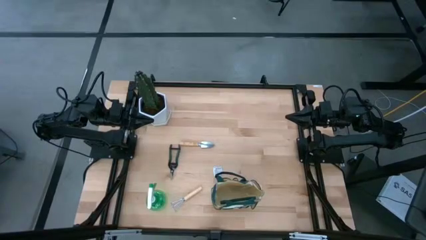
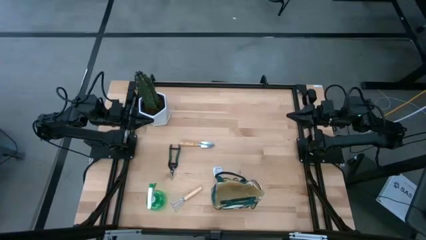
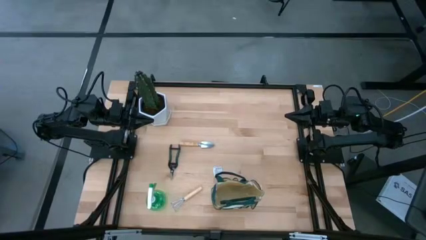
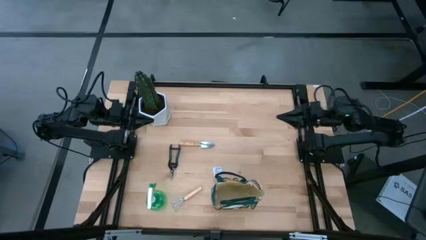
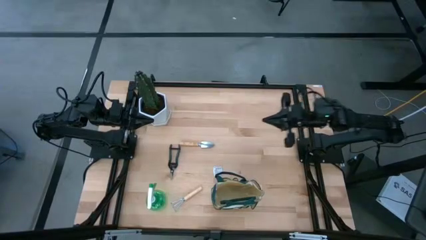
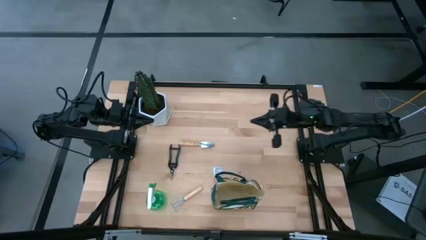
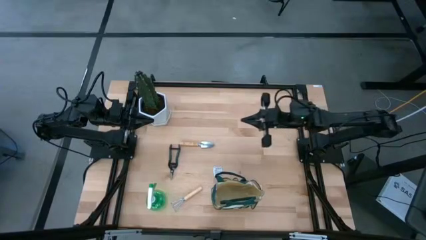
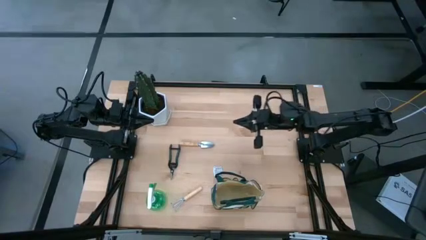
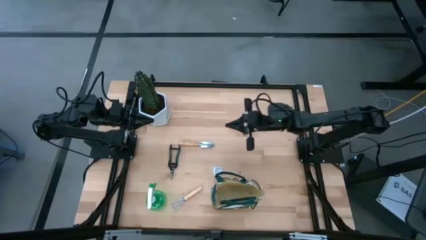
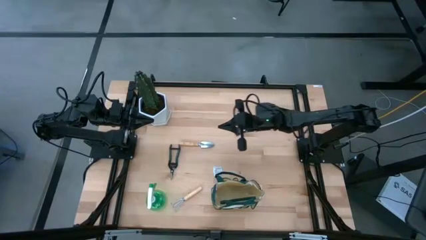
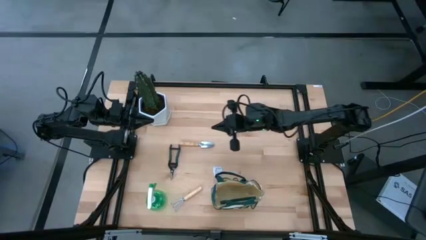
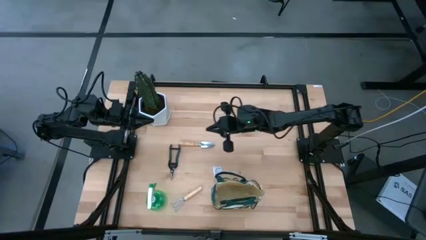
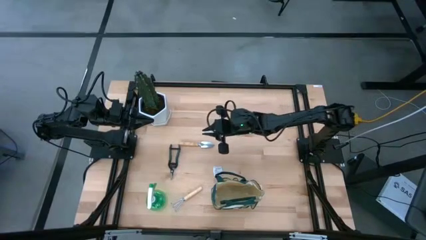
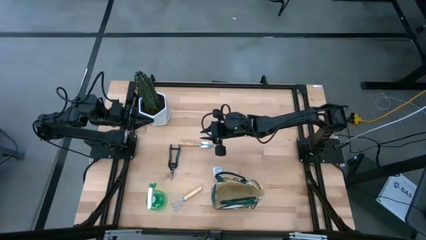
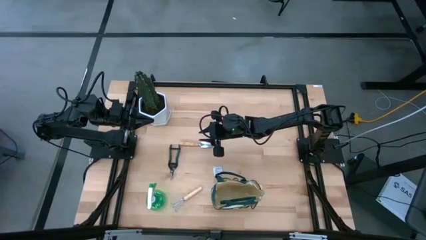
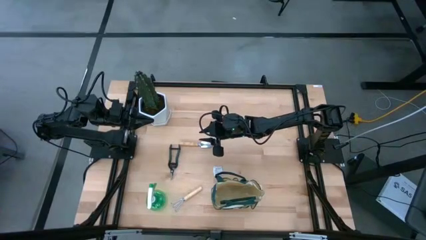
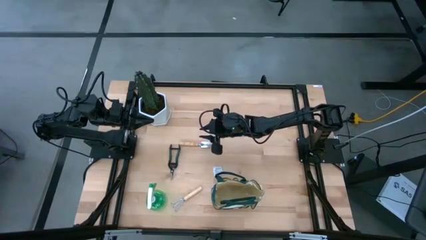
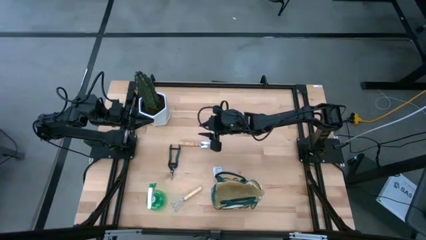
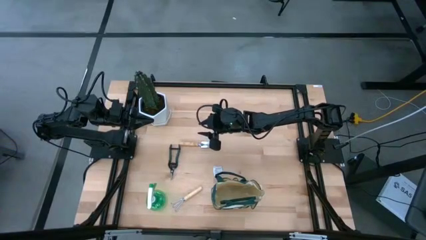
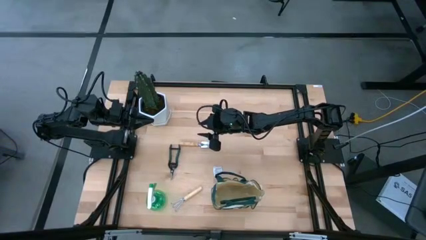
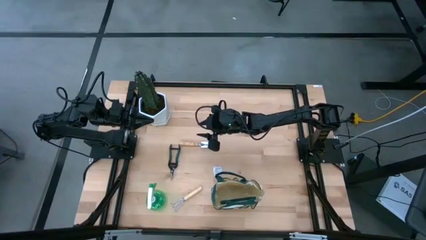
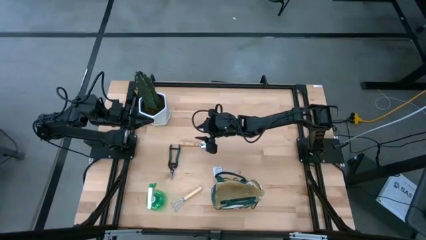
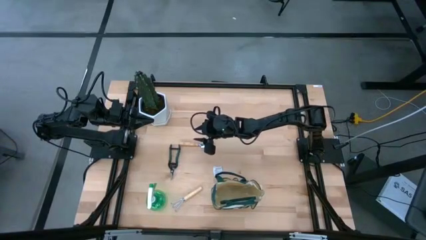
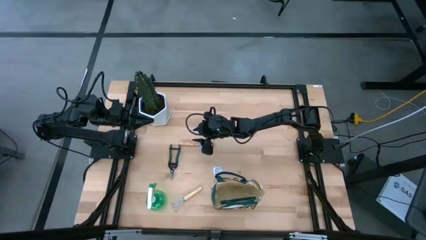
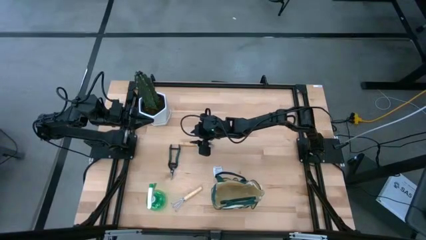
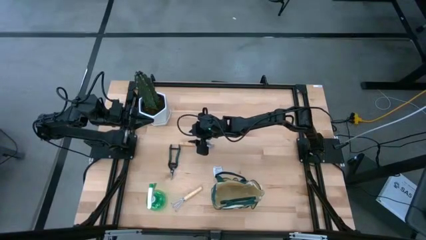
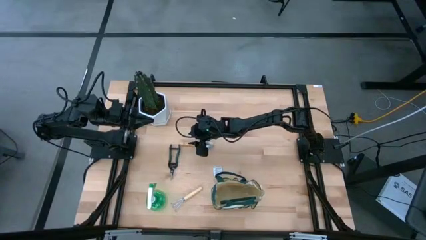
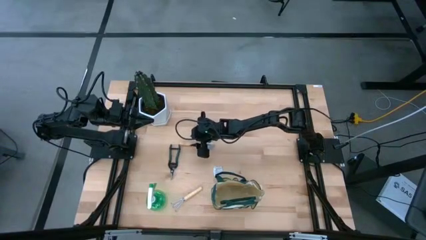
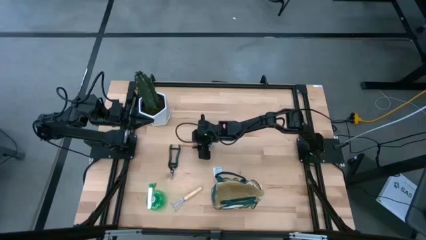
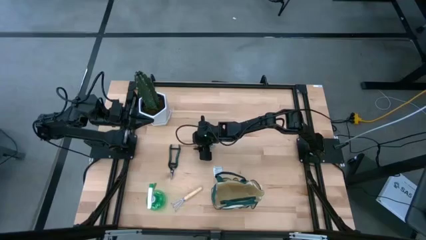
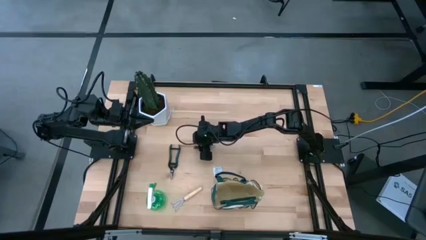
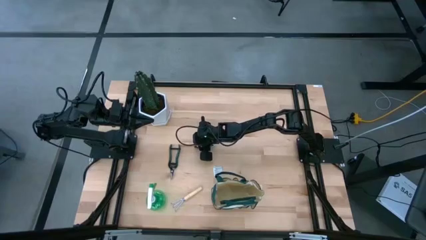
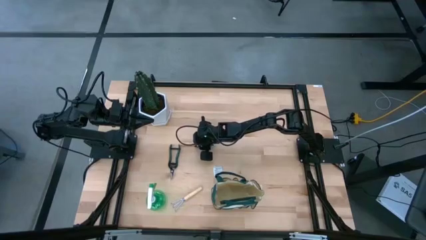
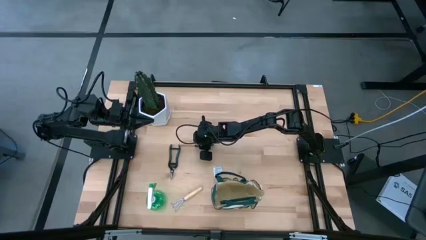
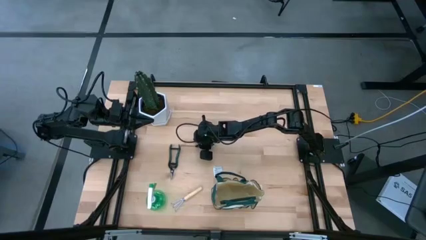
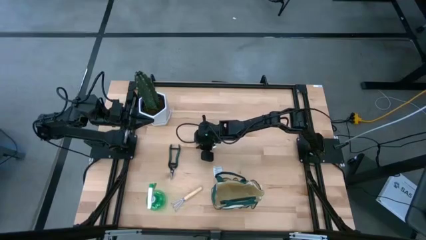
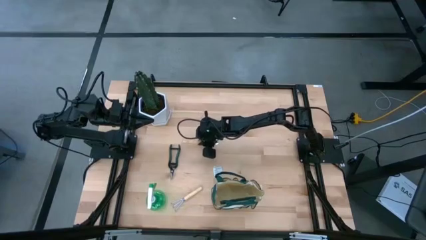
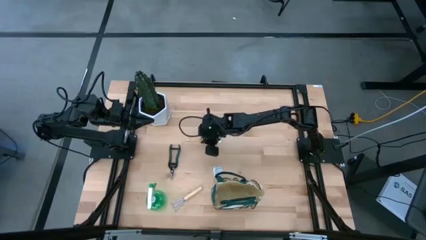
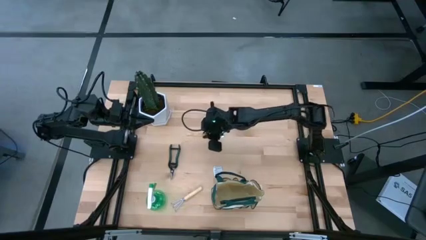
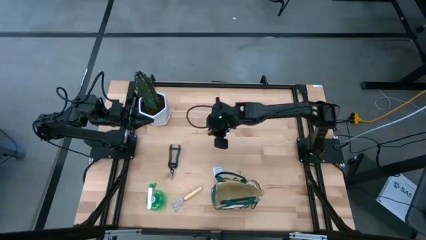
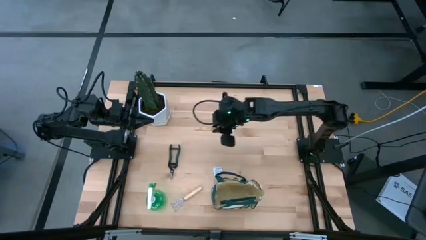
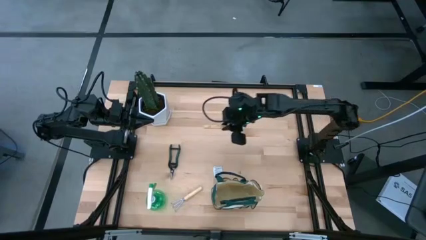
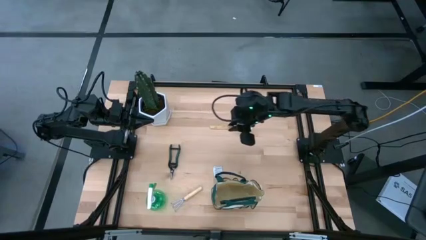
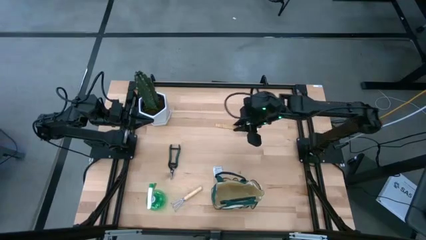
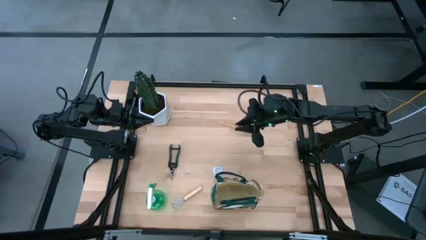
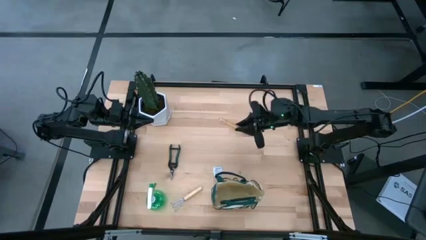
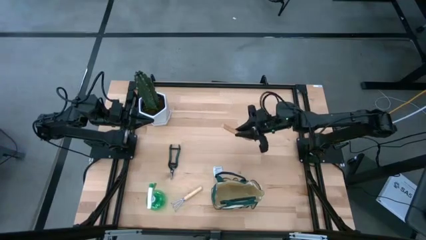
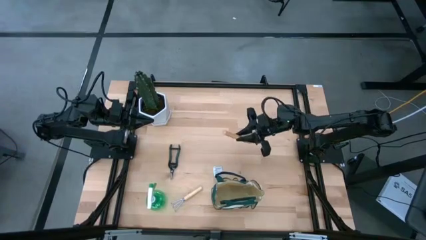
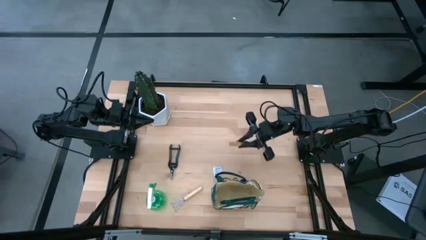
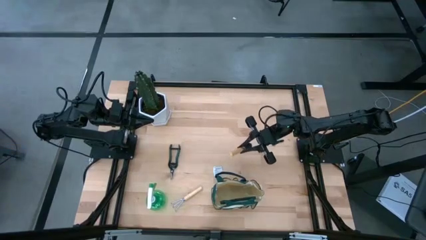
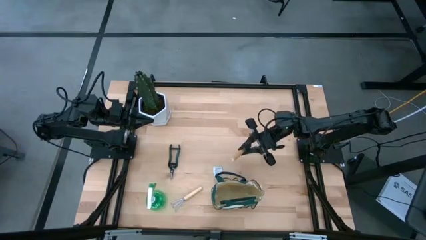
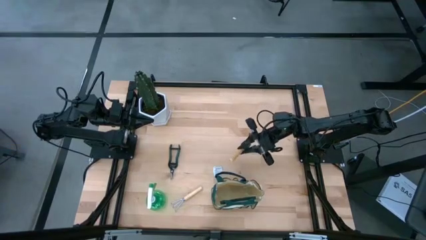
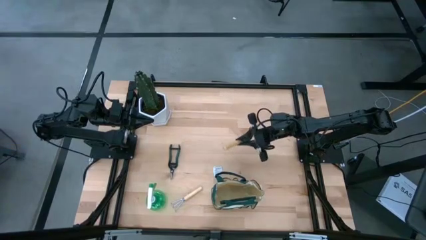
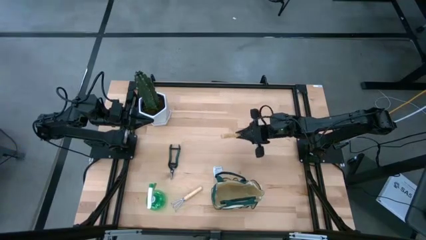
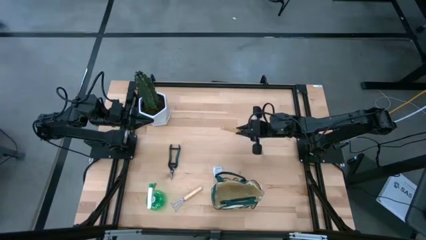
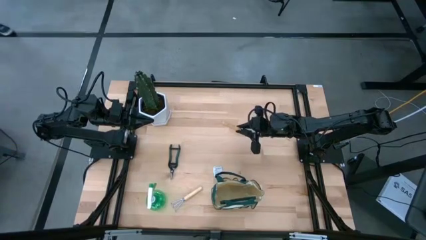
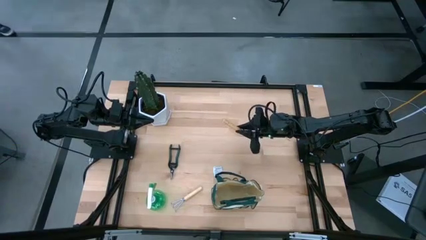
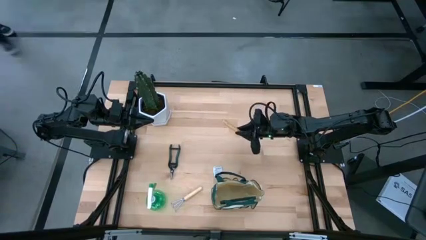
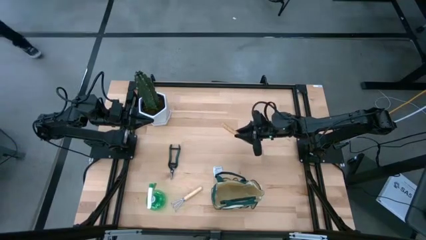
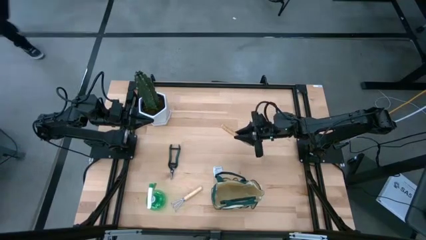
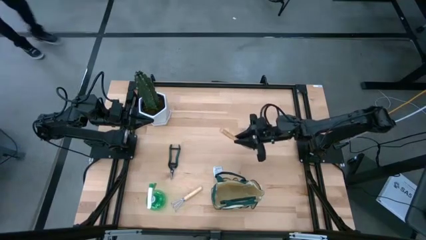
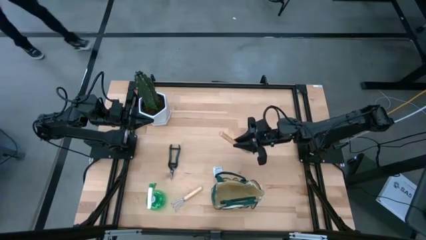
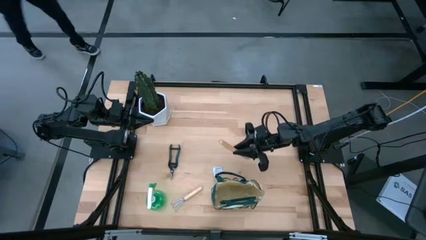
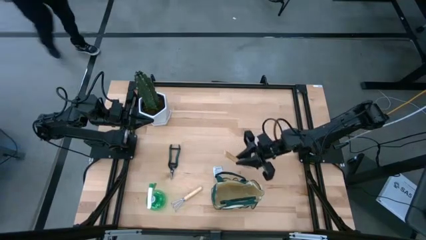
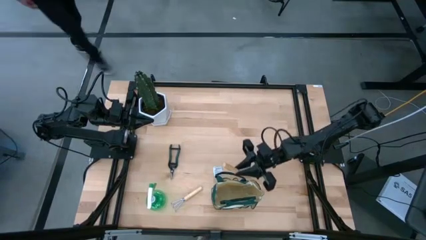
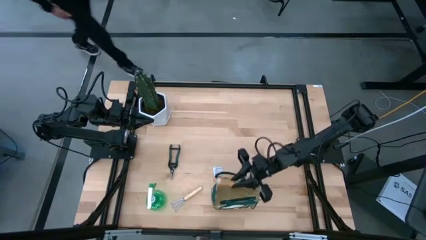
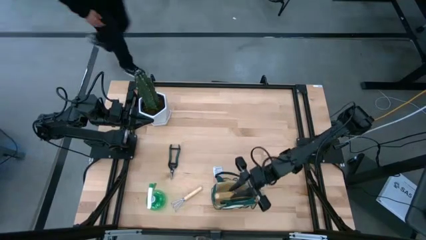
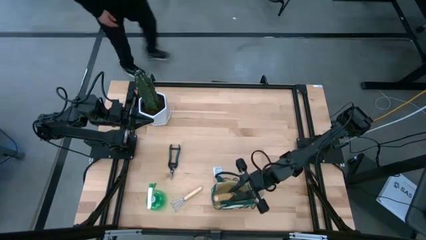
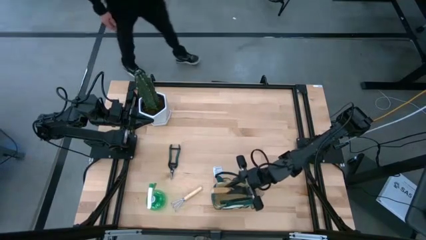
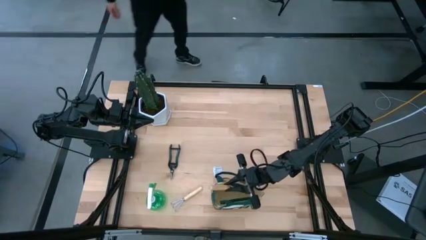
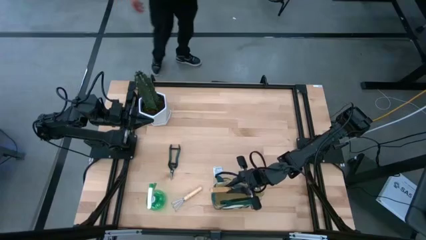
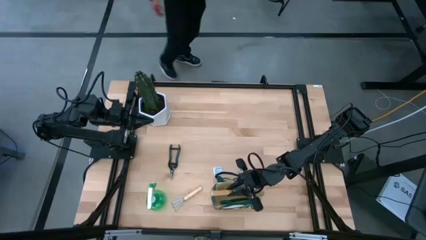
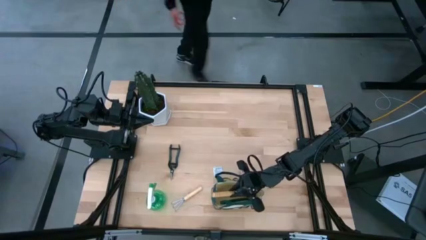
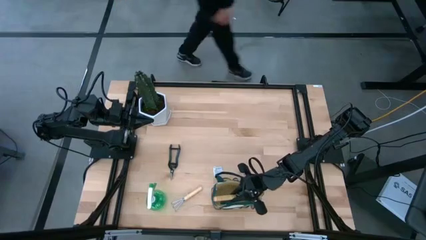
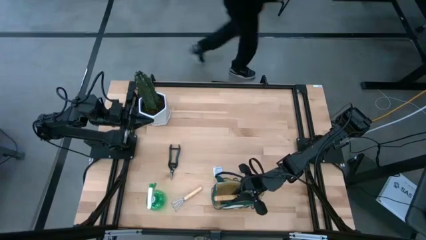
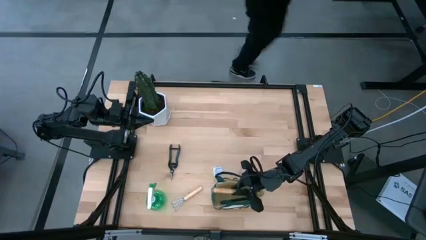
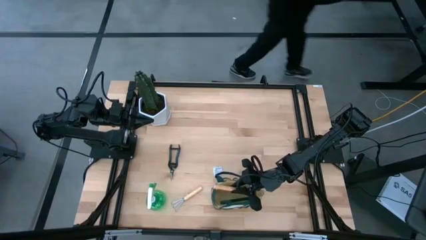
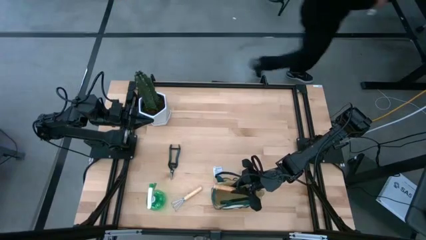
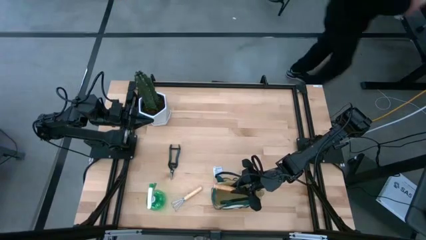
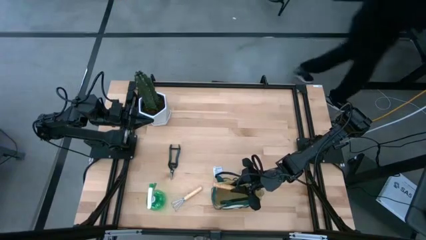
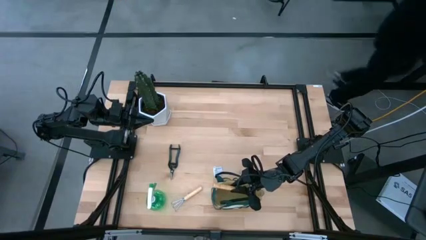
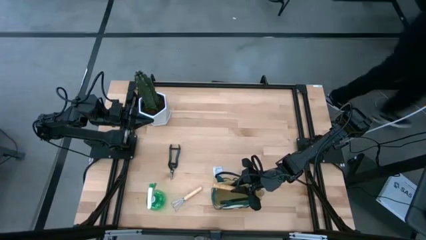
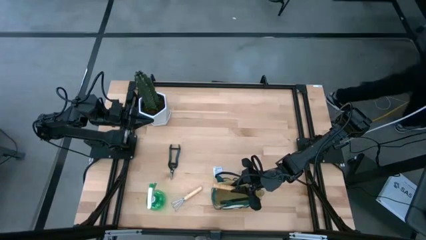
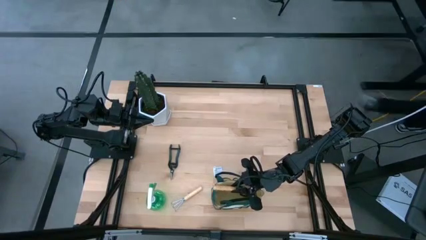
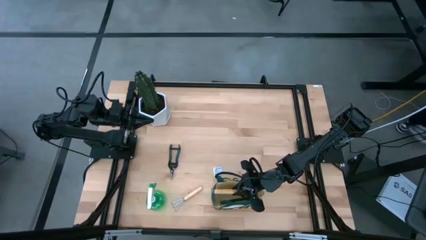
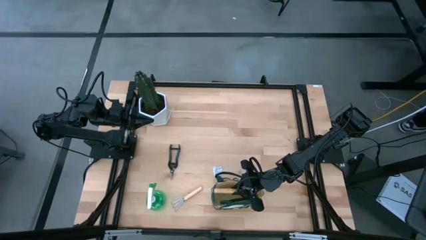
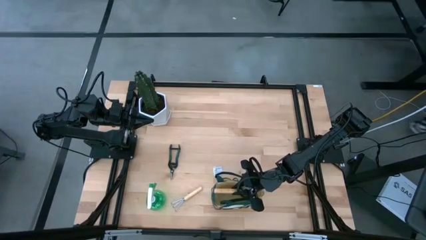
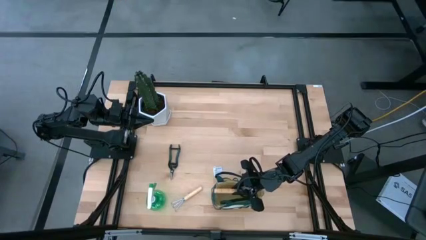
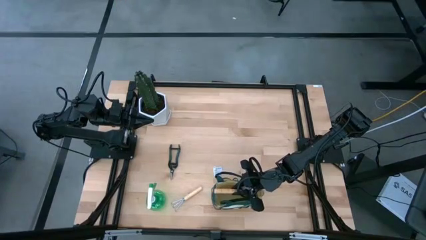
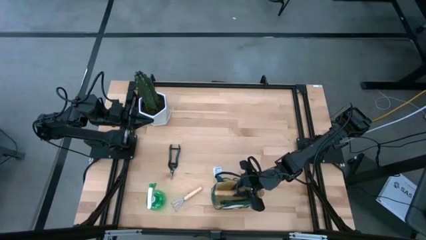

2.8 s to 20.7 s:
Task: Pick & Place Garden tools in Gardening bag
Put the brown trowel into the gardening bag
